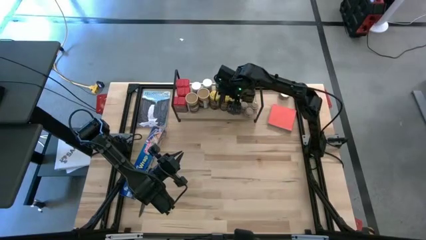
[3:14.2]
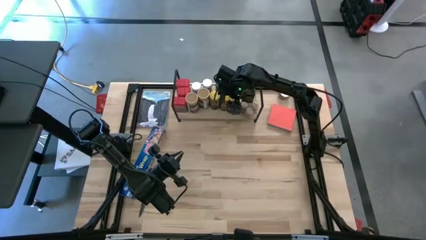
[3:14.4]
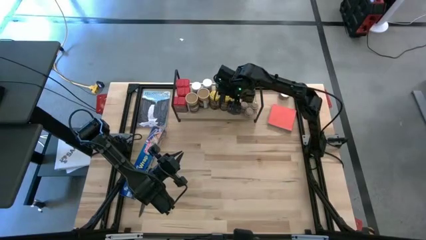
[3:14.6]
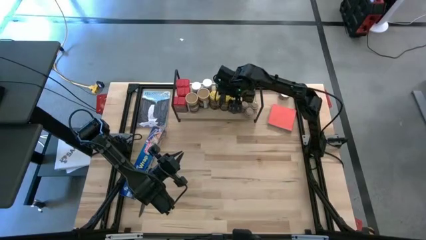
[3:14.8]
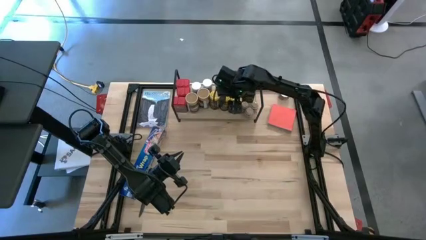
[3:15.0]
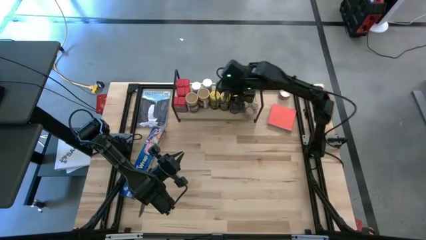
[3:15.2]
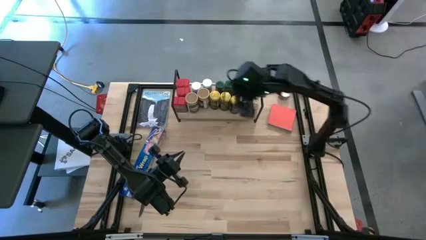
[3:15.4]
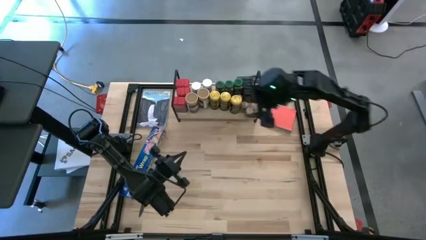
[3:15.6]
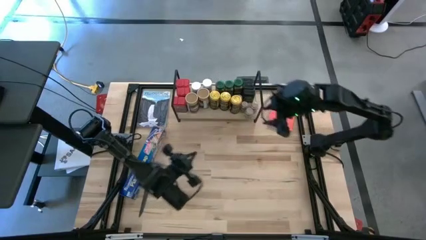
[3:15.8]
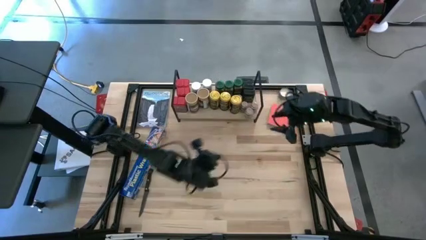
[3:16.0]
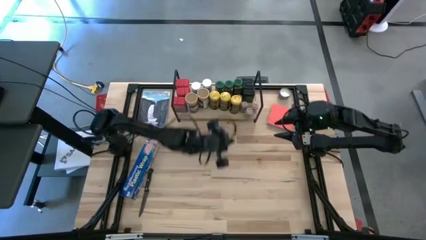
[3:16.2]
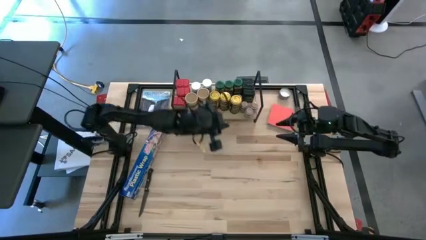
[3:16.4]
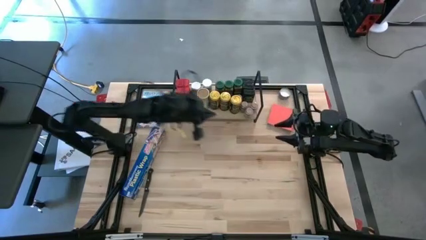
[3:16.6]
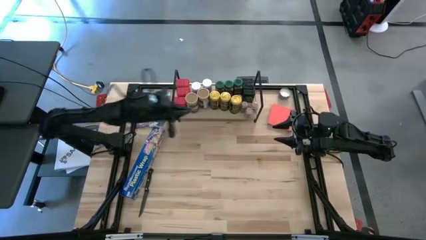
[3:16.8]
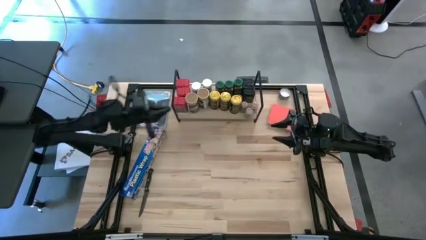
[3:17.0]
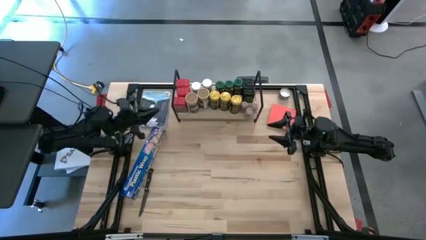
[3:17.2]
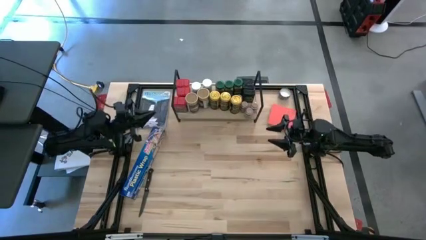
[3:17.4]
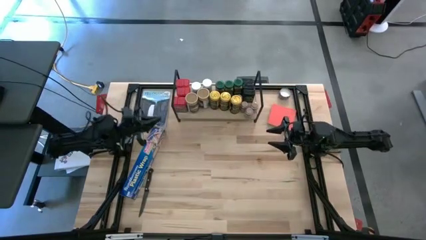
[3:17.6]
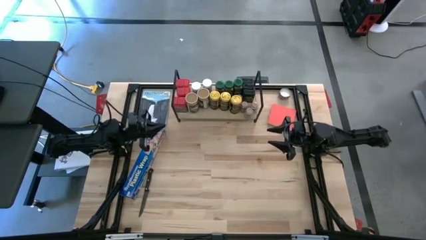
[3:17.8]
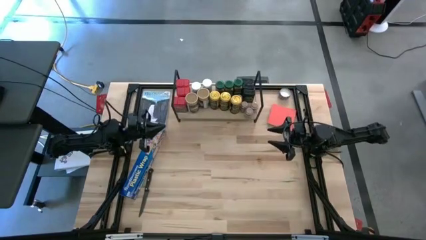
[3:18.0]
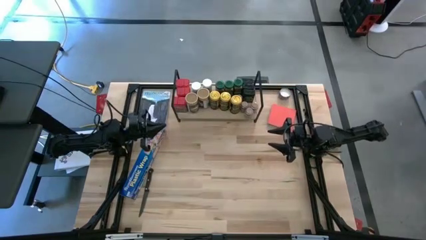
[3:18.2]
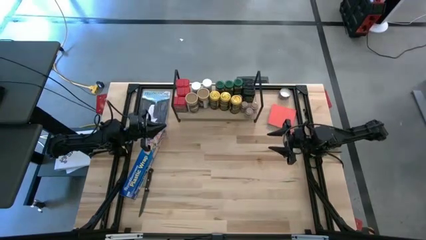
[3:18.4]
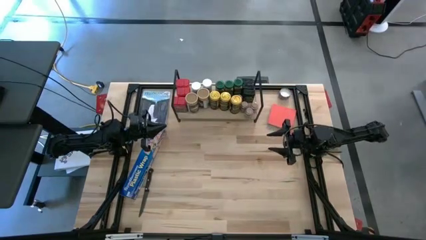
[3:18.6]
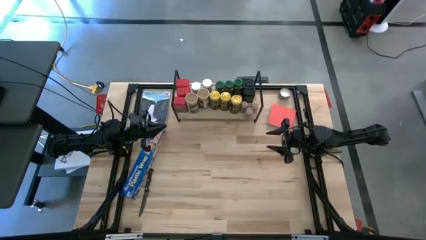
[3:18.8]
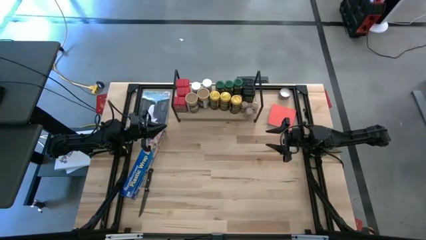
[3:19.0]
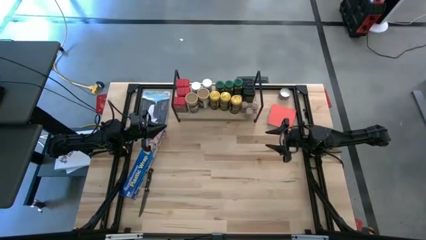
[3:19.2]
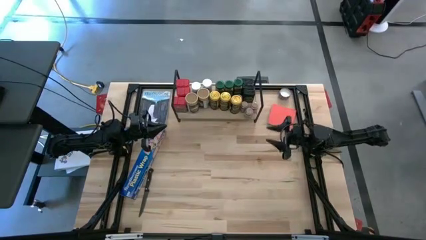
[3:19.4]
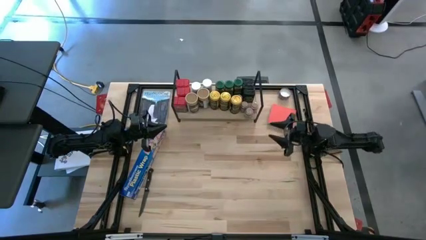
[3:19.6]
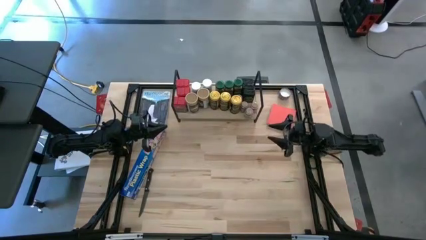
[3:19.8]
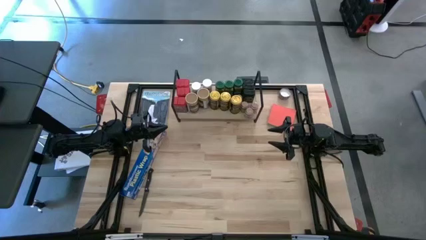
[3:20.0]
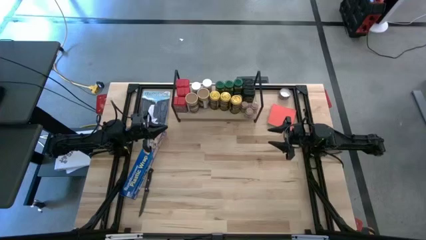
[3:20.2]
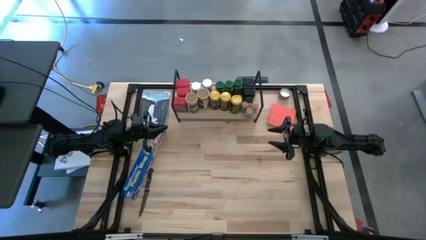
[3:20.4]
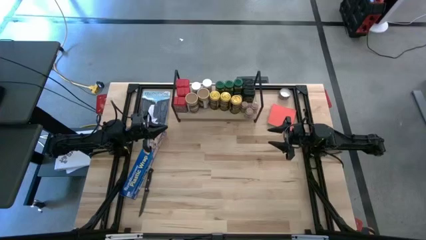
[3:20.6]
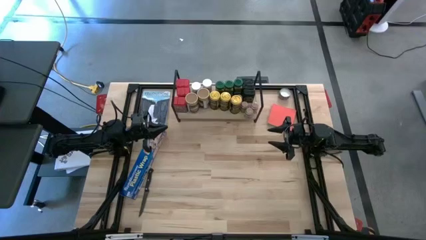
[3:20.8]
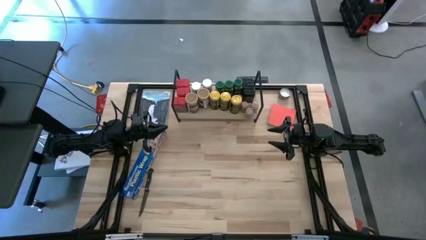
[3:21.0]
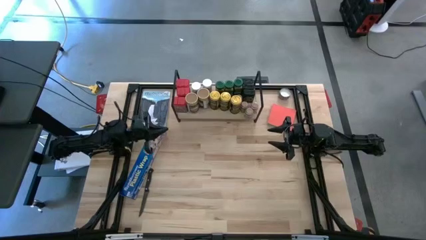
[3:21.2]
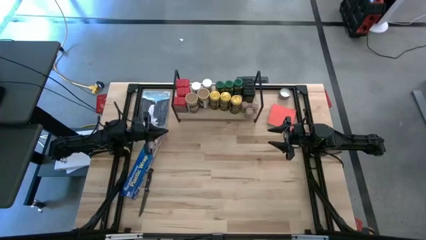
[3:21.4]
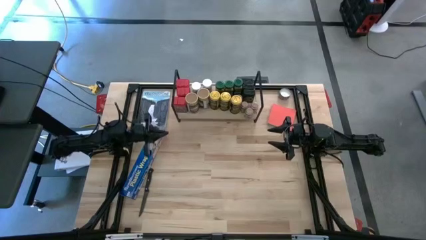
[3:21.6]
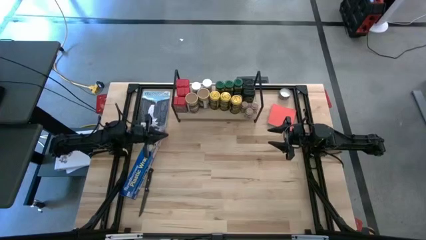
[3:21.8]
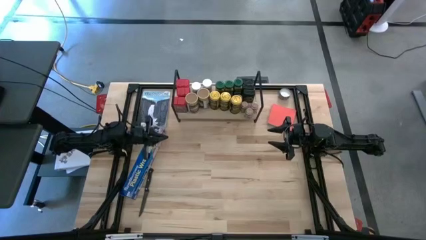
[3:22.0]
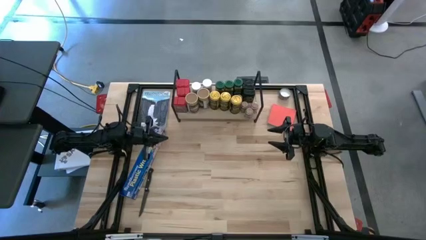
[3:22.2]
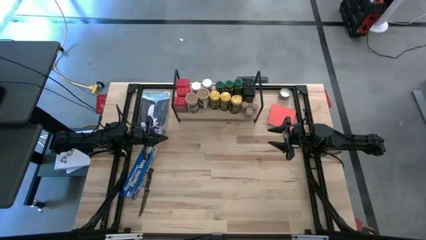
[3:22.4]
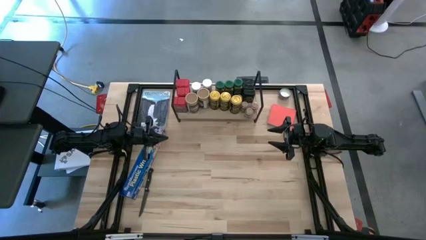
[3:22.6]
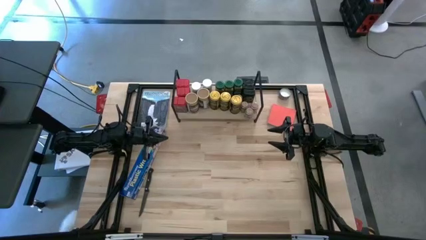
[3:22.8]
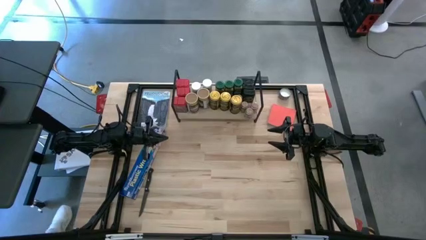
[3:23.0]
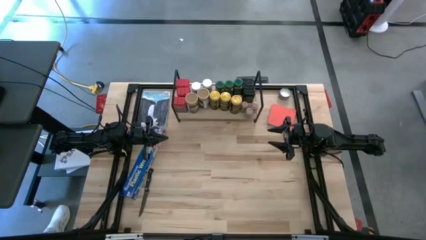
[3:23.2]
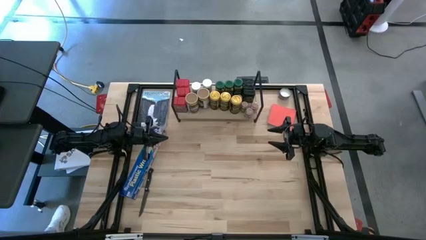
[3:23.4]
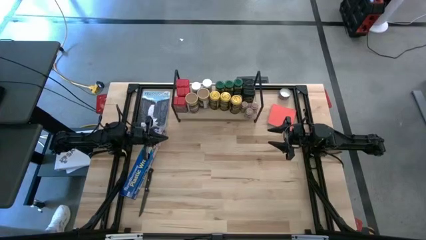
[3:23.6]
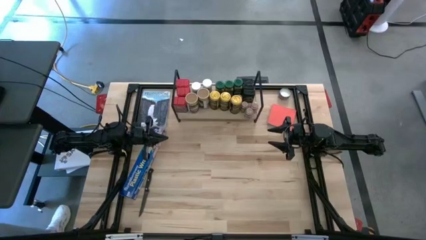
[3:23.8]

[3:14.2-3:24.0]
Task: Shelf spices
Return to Home Position
